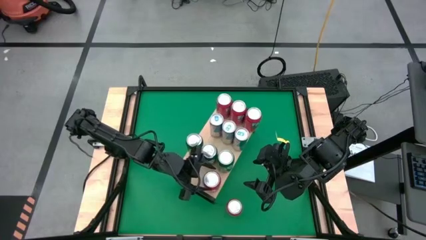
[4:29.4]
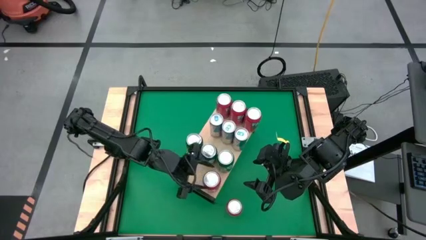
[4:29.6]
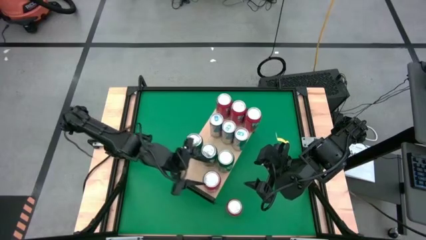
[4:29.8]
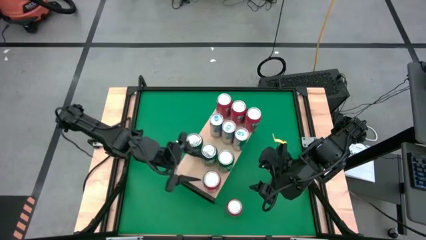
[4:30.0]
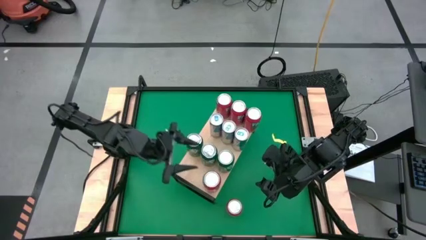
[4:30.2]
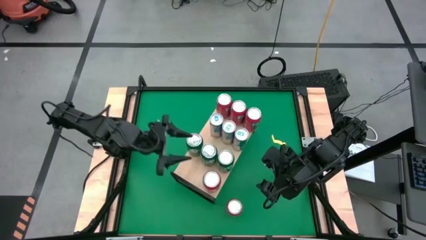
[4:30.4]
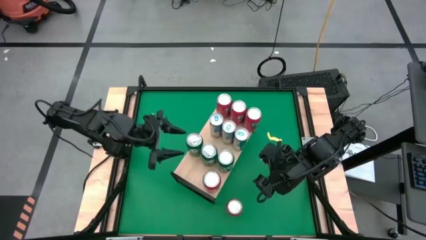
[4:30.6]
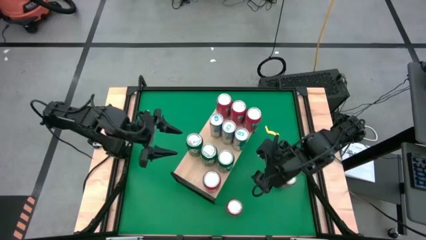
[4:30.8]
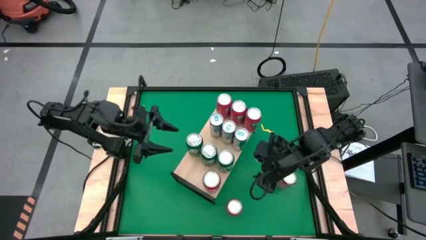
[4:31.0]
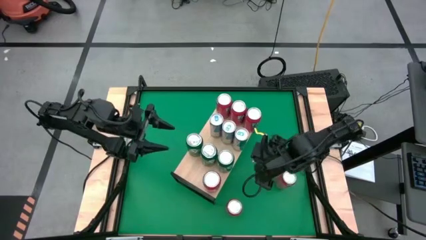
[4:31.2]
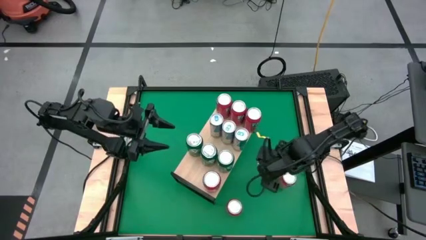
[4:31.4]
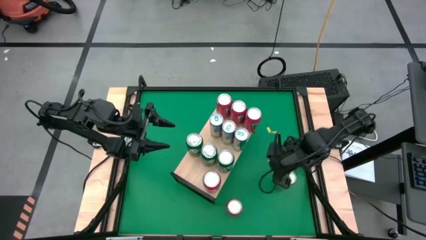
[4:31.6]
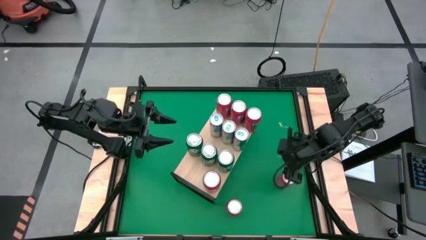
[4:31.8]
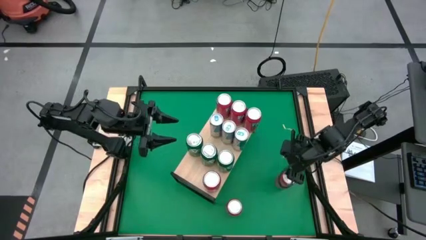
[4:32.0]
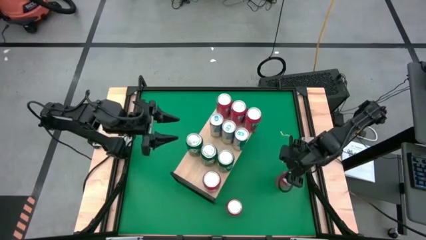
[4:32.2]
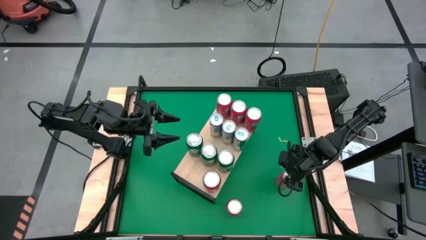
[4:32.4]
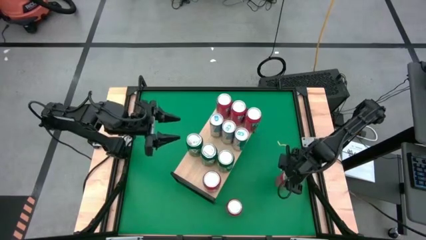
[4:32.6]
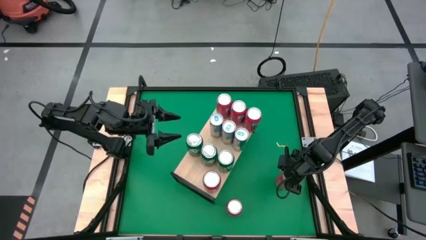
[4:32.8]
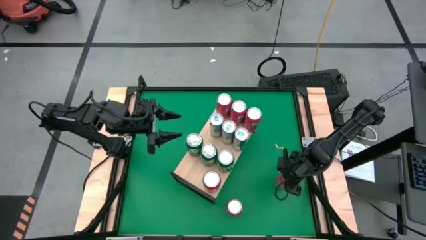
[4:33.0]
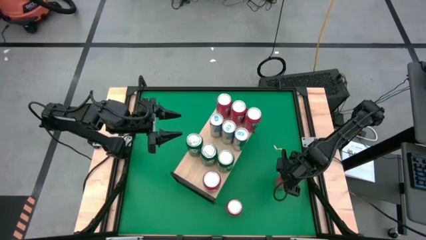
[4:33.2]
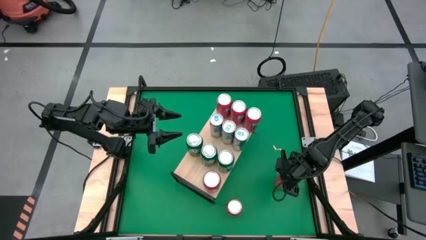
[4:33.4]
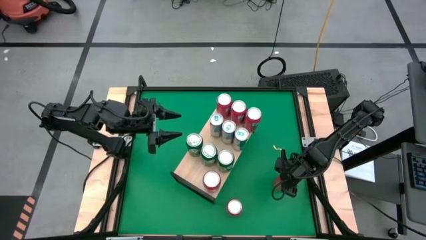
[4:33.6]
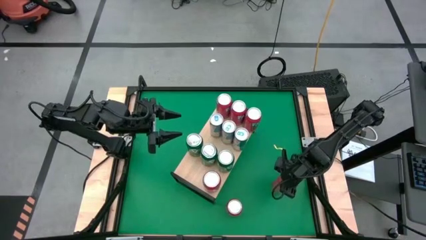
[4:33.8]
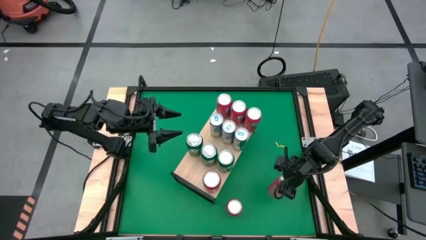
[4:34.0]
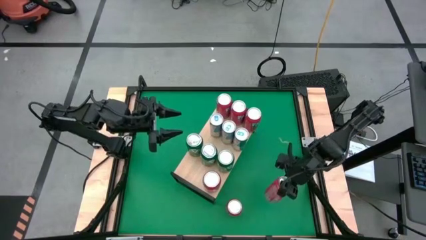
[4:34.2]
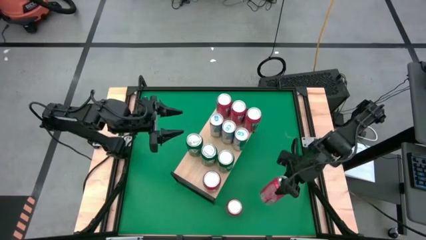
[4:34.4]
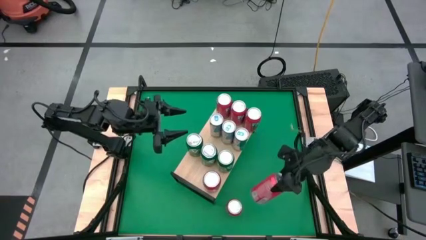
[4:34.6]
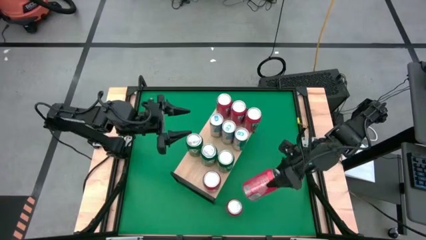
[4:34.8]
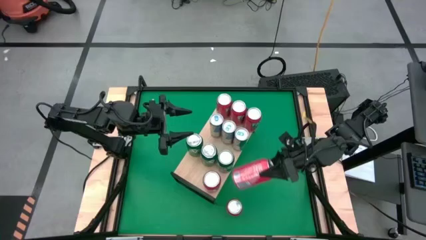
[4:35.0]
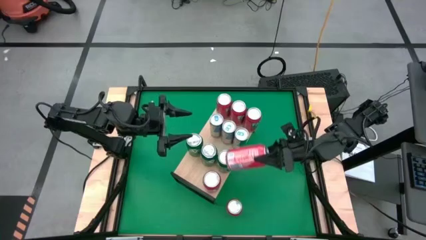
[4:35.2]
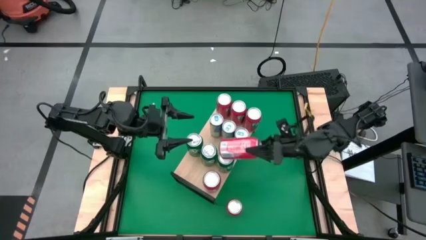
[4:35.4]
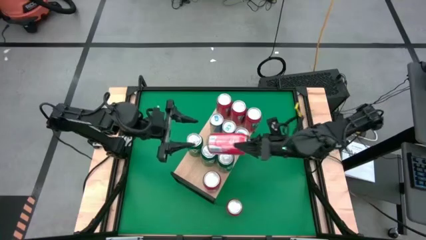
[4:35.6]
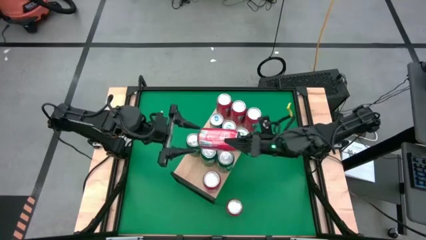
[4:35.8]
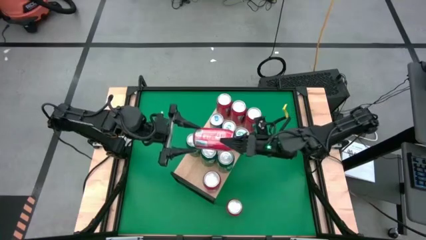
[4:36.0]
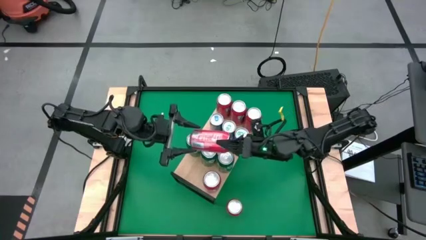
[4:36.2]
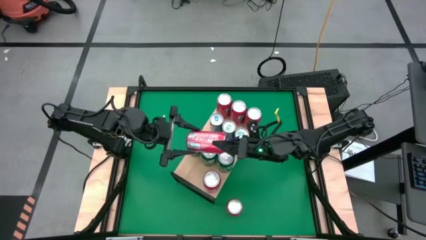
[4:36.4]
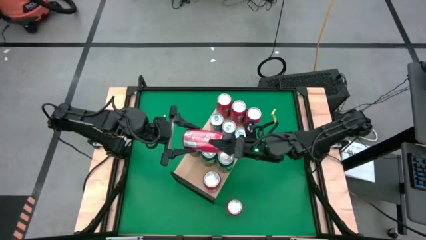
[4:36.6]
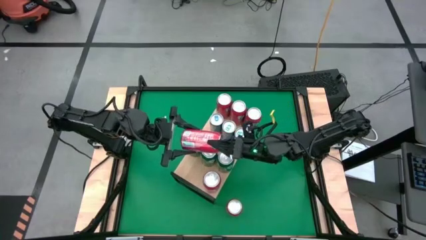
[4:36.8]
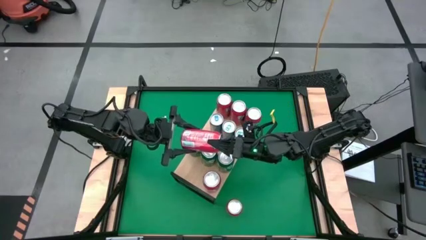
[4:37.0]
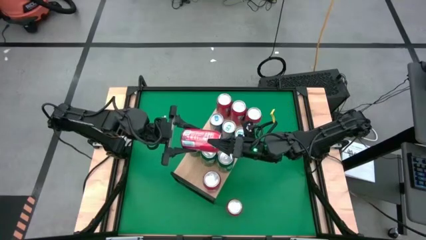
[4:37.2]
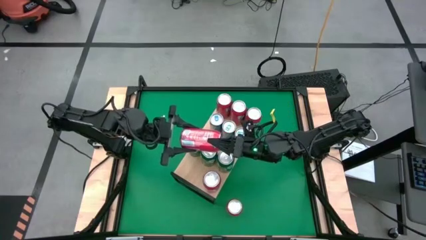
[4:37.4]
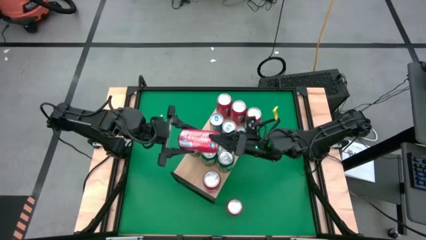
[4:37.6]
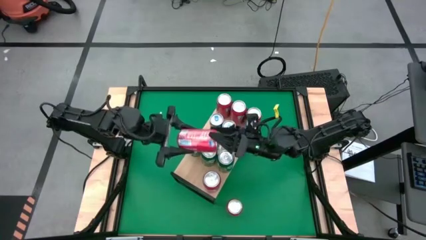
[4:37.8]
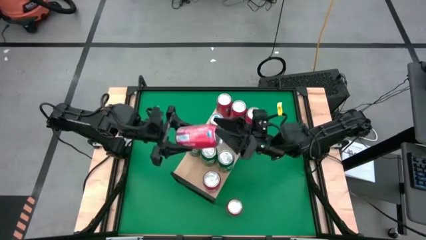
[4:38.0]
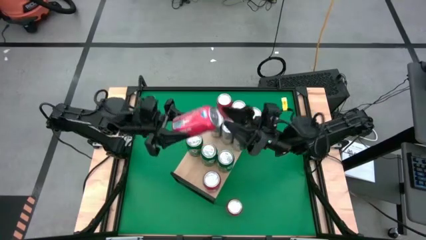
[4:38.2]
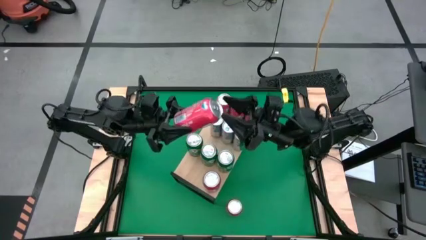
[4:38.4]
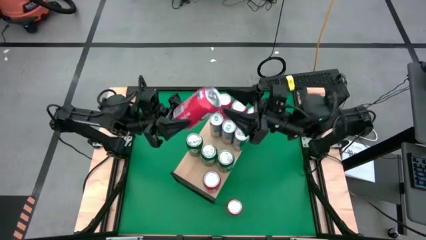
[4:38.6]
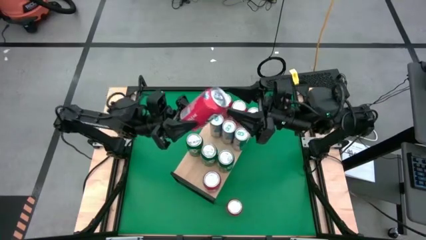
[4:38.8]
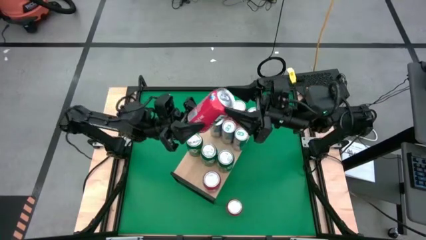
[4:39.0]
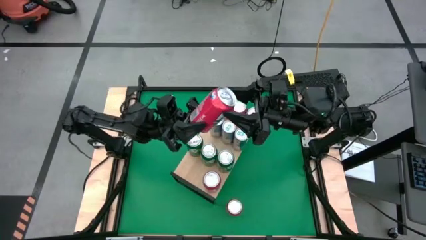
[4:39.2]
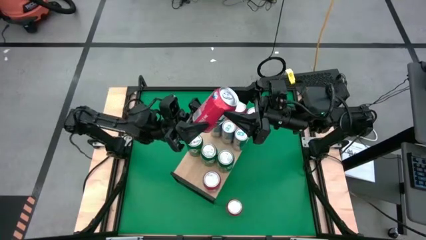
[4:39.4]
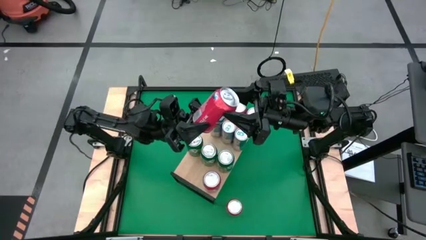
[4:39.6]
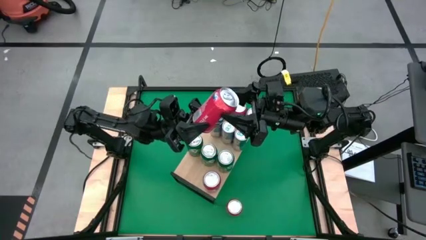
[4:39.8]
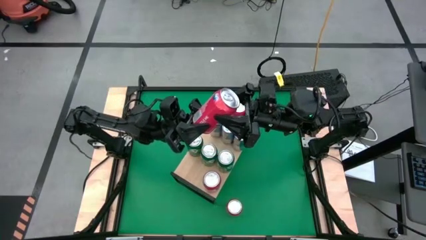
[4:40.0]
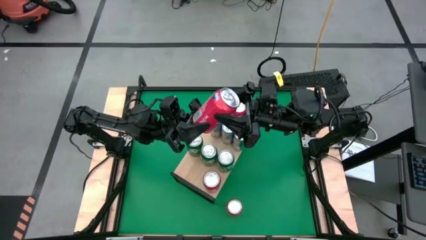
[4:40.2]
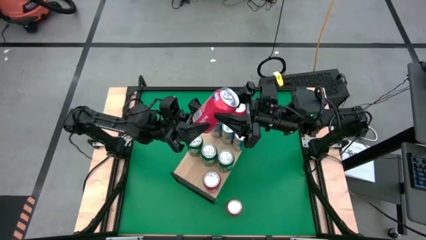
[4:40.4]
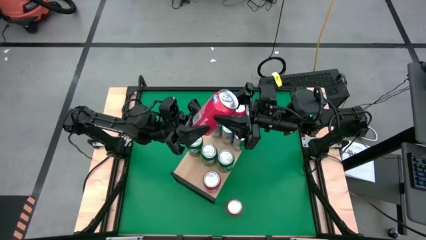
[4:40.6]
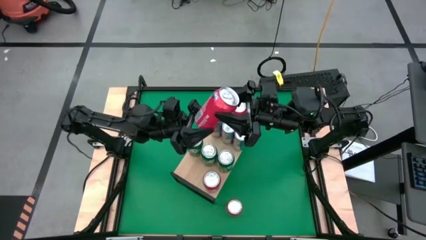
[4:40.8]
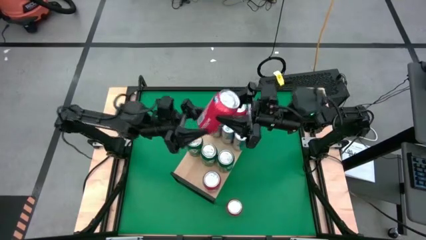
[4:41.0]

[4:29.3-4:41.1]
Task: Sort soda cans
Put the red soda can on the shelf and align it with the bottom red soda can

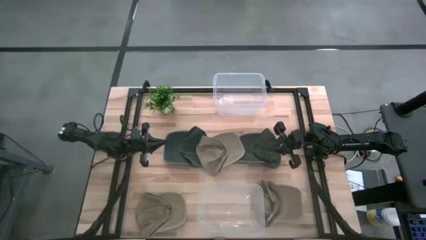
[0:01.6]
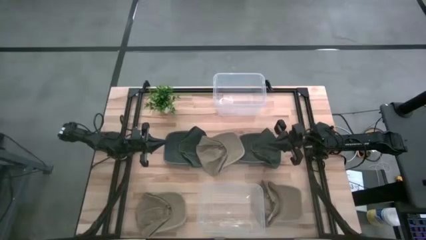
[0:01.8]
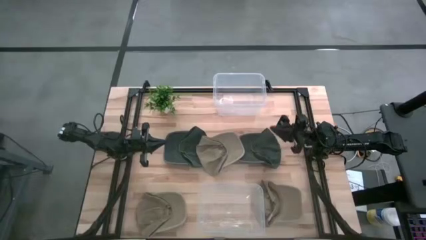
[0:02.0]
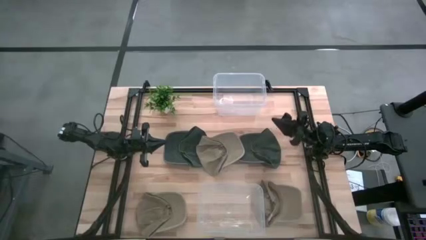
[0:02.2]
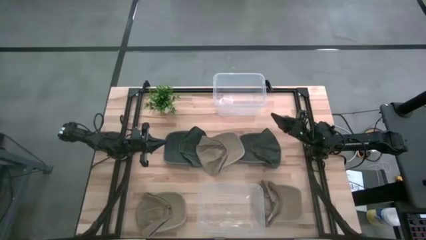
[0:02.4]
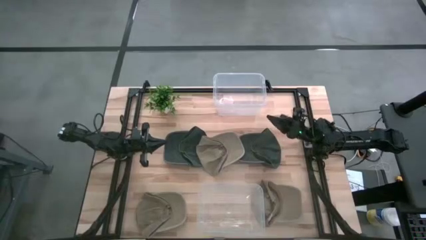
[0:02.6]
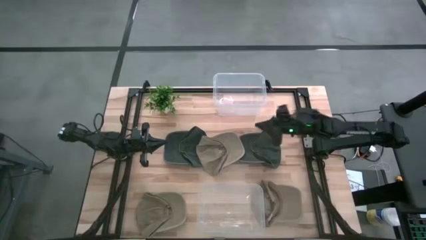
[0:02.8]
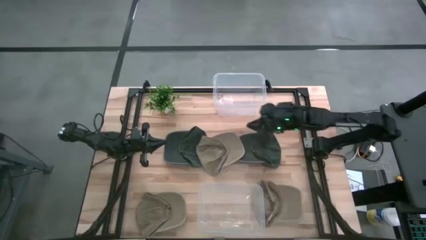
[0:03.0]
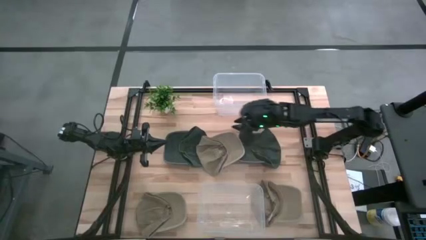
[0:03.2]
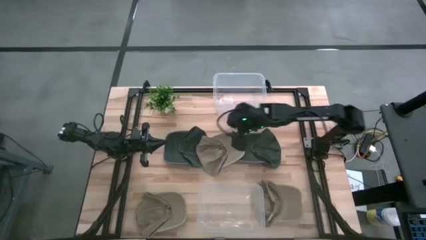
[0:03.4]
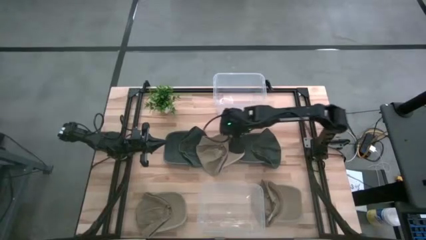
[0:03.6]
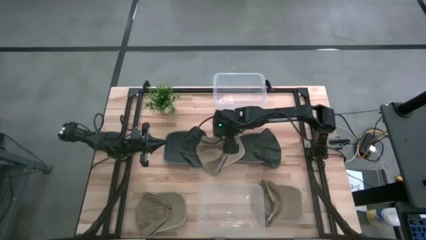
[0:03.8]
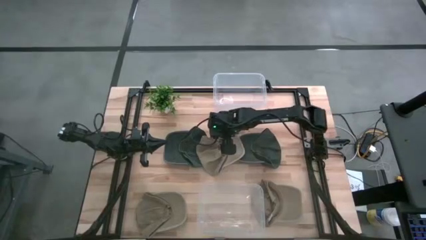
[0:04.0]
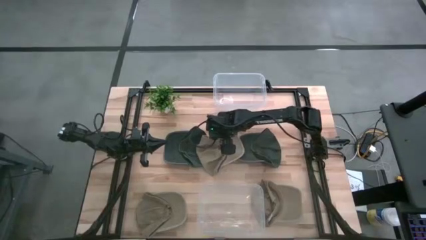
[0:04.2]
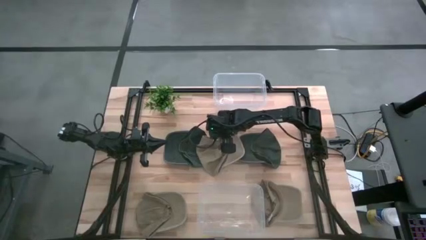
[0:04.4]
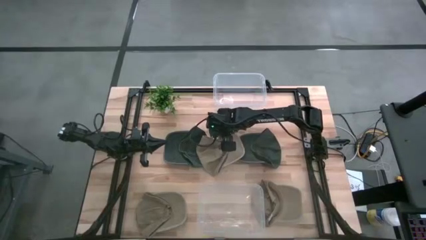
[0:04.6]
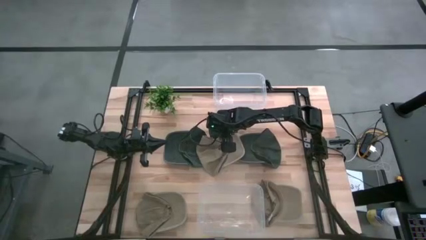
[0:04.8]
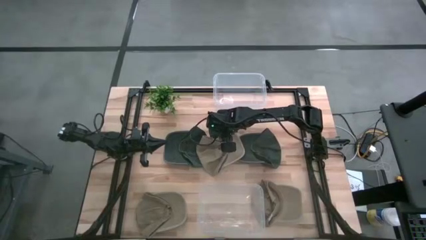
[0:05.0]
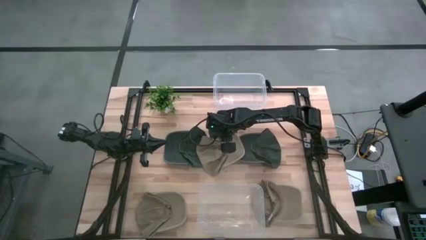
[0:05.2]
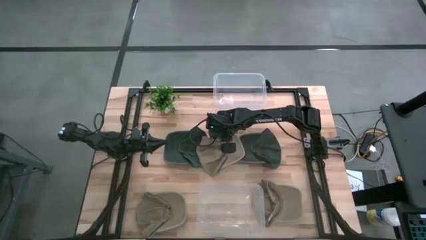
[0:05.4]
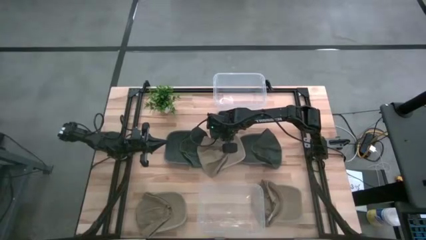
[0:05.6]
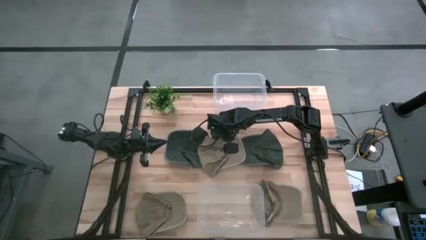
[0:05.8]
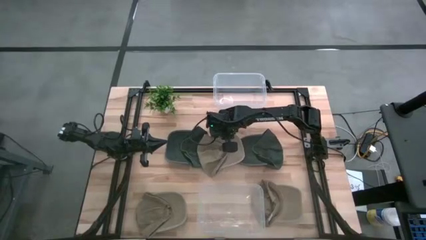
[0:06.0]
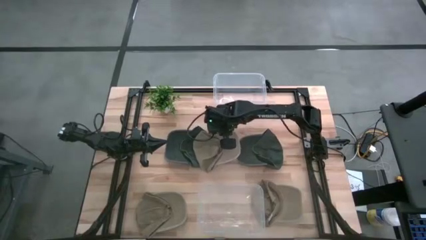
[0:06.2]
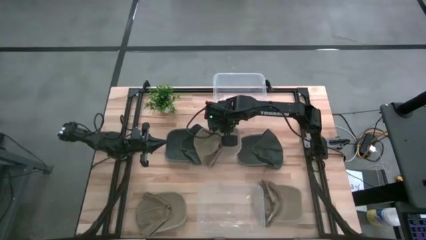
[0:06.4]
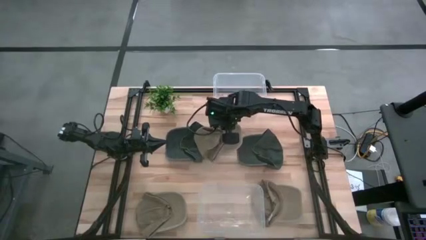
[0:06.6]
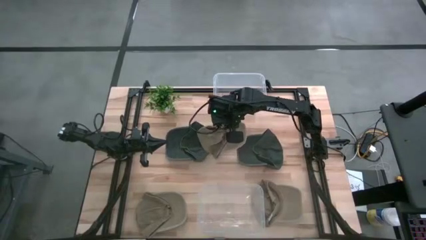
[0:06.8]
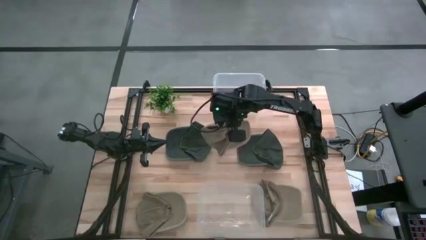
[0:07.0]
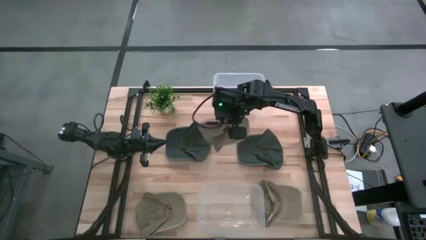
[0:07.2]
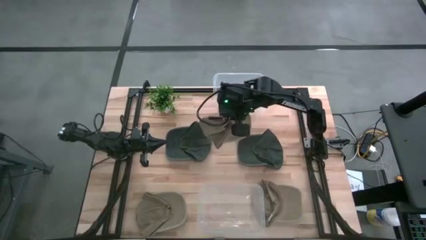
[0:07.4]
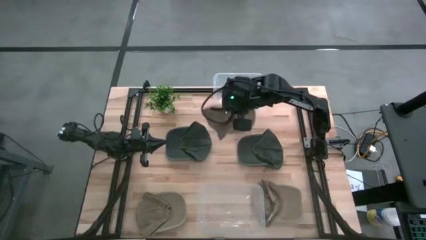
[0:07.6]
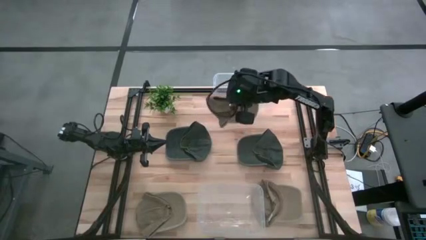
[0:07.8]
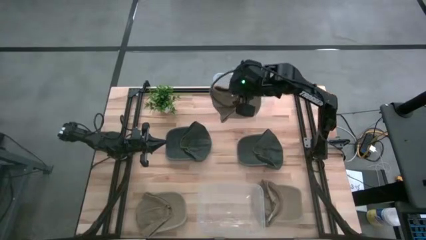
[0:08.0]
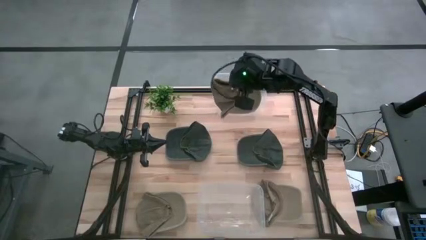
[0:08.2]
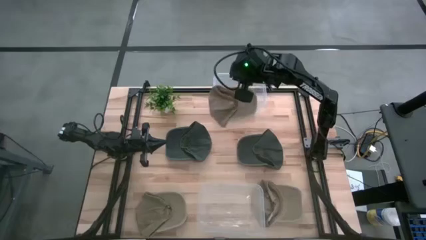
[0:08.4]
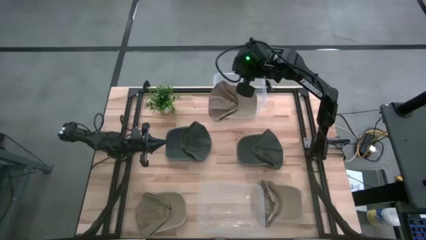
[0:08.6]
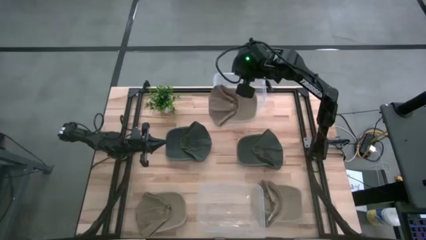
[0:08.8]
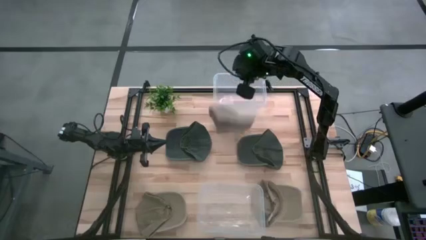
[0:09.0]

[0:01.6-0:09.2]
Task: Pick & Place hat
Put the top brown cap into the top transparent bin
